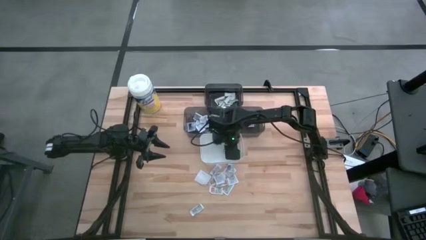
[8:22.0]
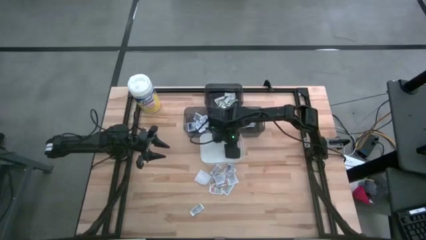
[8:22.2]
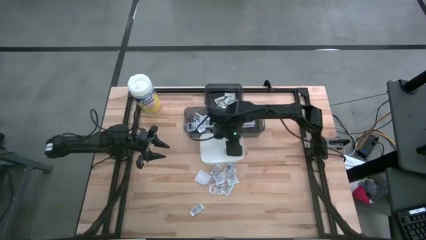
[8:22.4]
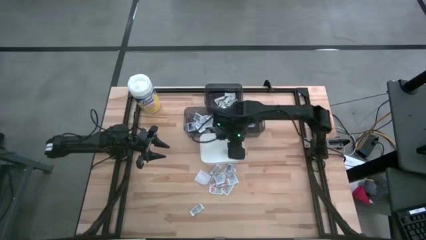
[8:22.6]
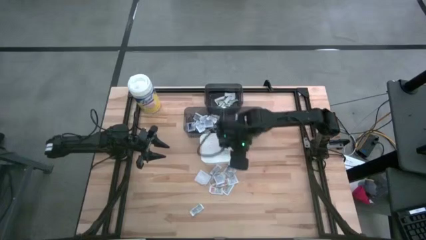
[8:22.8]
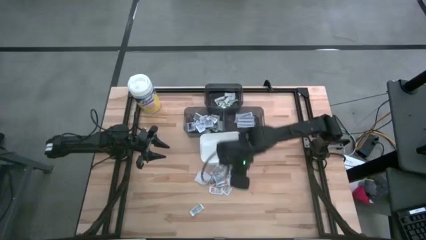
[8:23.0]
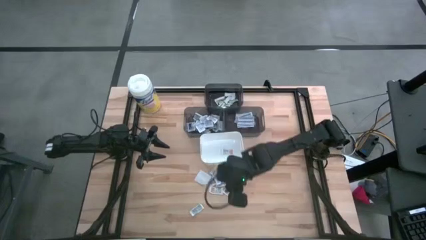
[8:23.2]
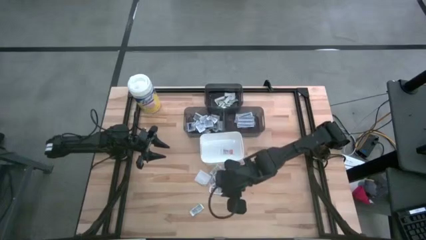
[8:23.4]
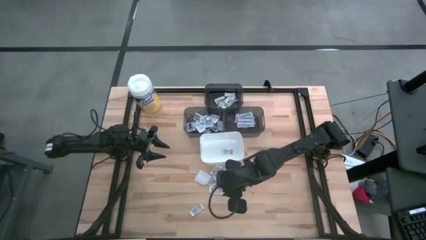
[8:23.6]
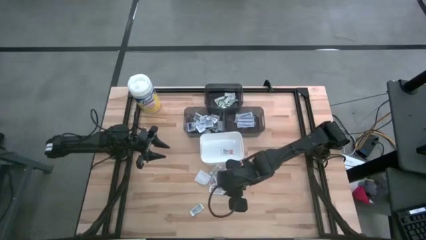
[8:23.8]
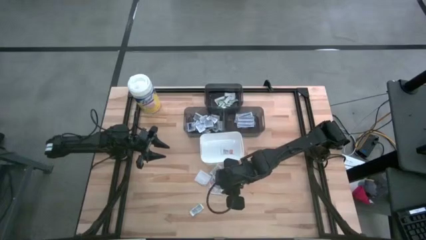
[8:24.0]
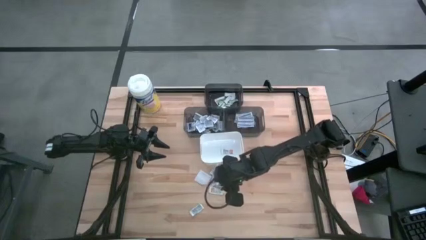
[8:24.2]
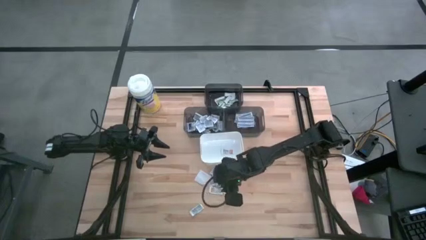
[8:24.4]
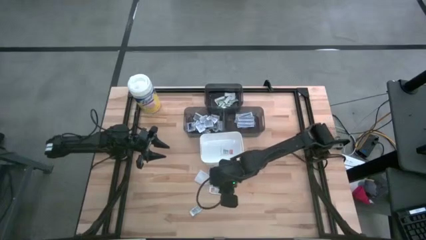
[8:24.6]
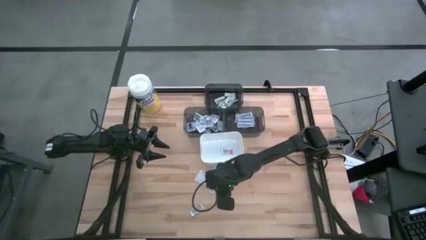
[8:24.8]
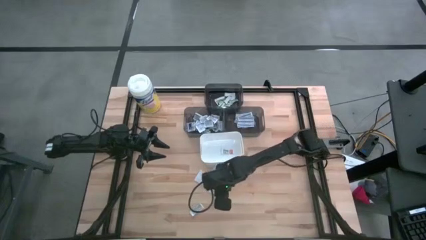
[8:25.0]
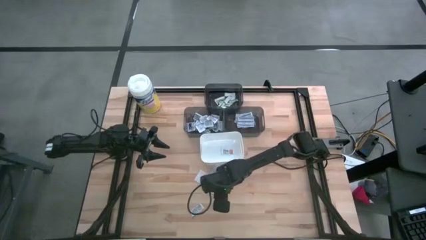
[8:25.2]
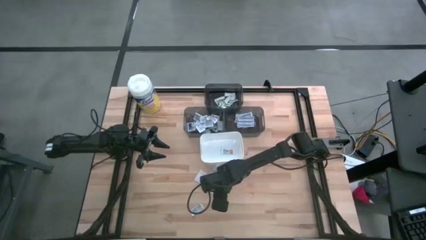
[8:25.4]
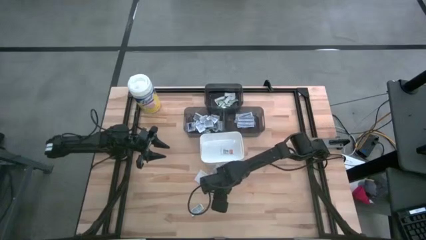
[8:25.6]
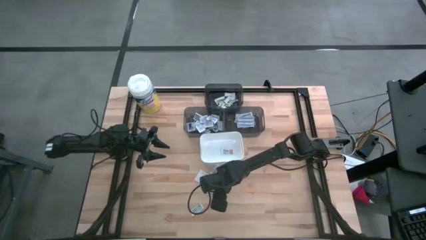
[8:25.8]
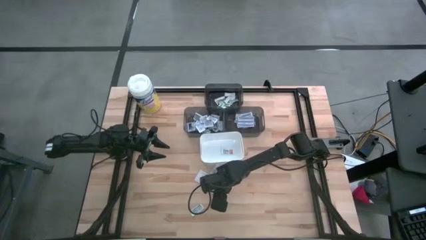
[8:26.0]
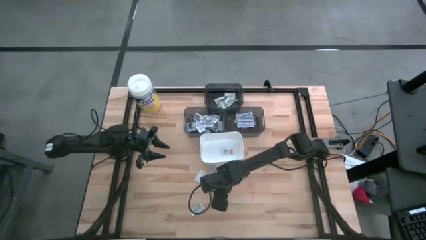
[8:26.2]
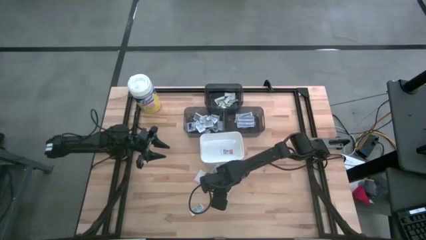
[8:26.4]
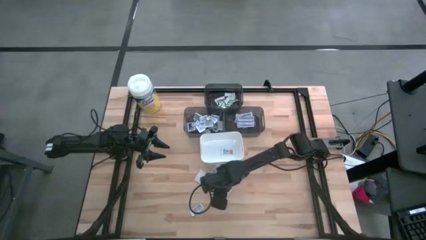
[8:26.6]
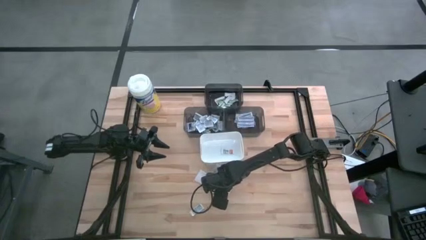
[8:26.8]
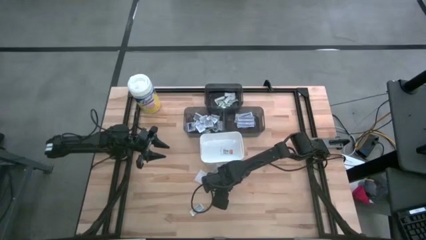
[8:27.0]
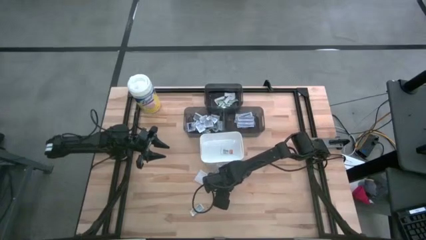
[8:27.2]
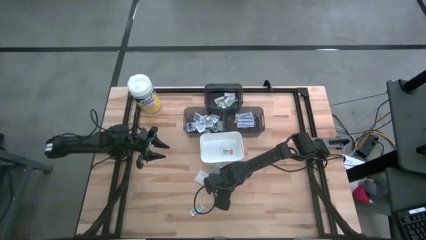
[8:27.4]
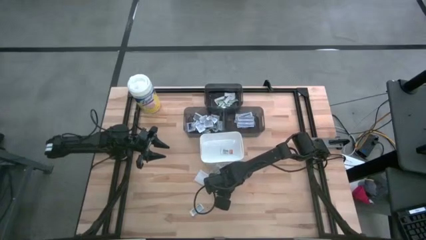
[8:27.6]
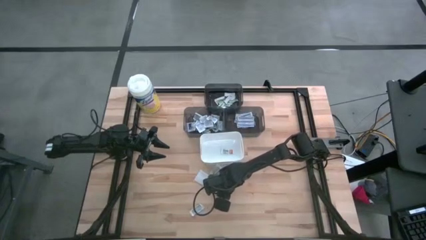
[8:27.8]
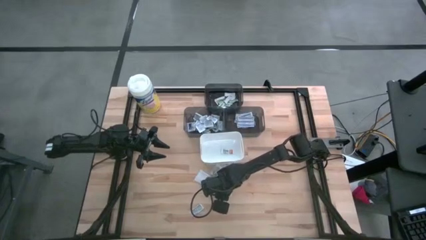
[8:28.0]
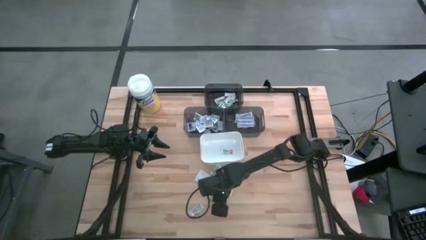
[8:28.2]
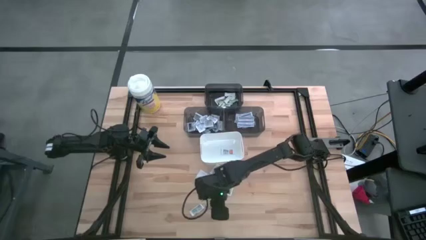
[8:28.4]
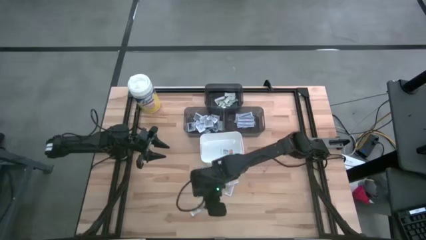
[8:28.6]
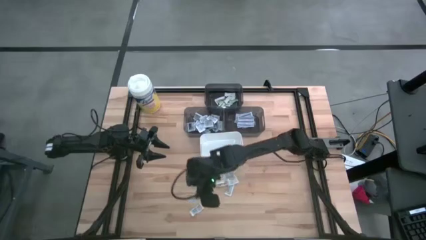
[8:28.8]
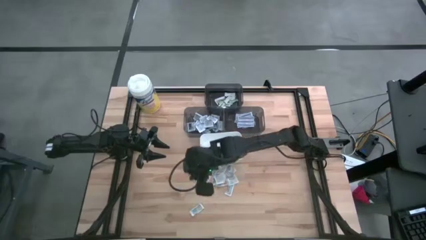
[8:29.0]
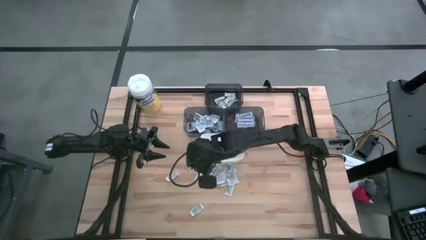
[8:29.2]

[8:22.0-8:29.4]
Task: Pick & Place First Aid Supplies
Put the ointment pack into the white bin

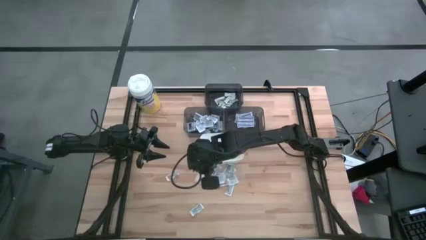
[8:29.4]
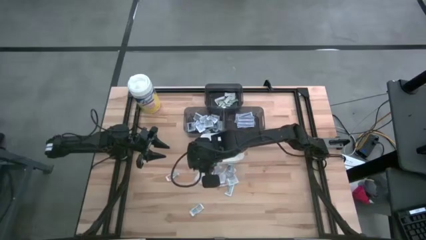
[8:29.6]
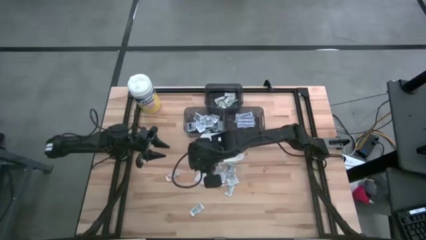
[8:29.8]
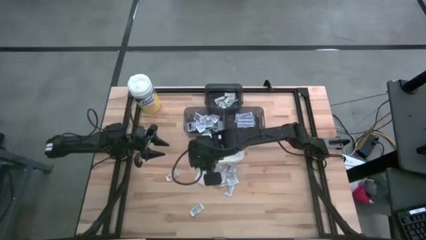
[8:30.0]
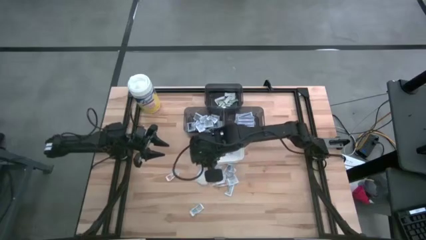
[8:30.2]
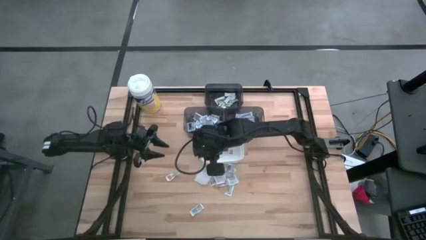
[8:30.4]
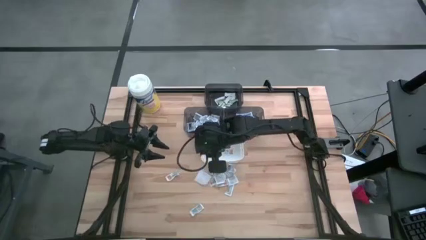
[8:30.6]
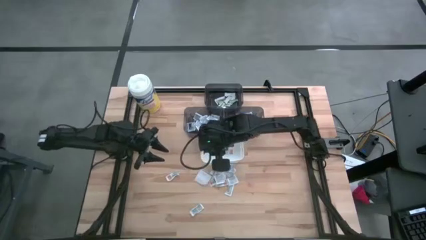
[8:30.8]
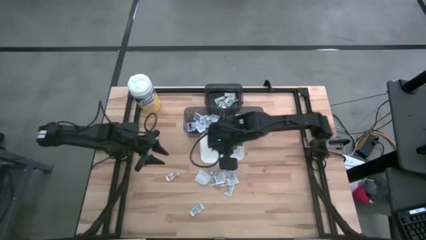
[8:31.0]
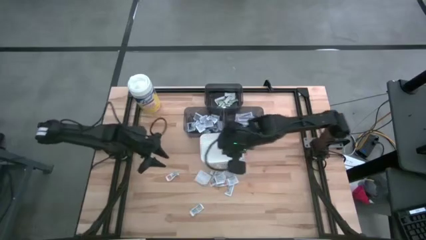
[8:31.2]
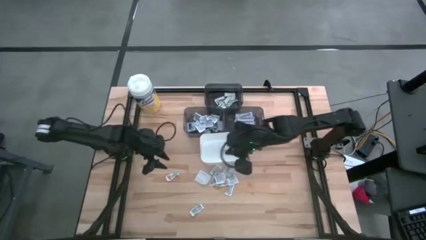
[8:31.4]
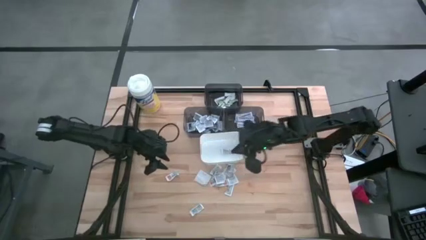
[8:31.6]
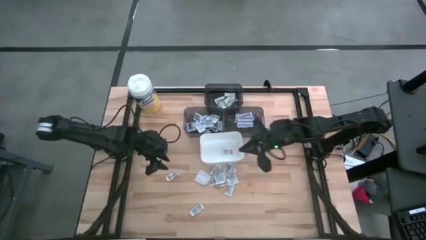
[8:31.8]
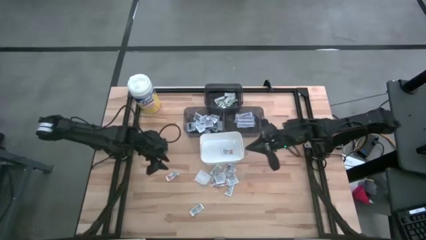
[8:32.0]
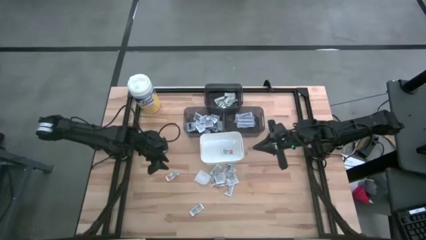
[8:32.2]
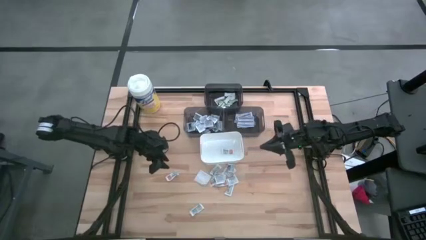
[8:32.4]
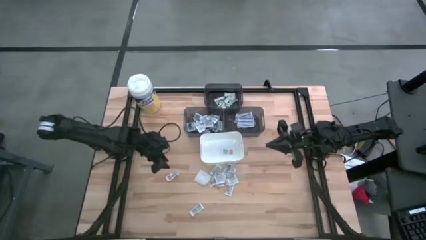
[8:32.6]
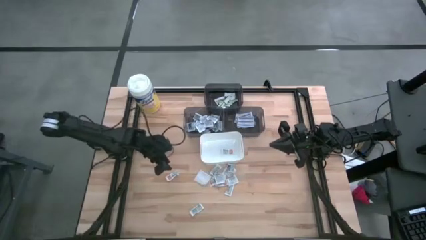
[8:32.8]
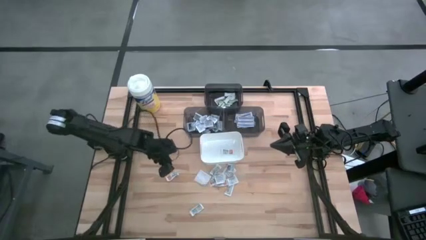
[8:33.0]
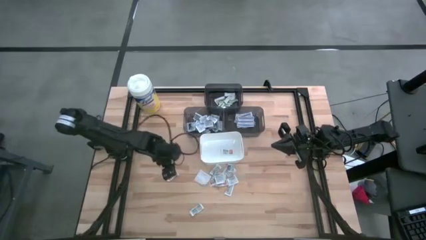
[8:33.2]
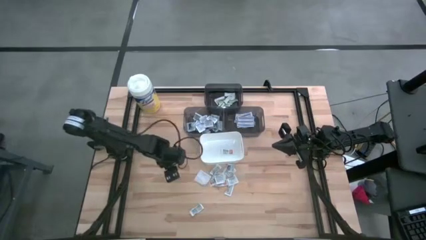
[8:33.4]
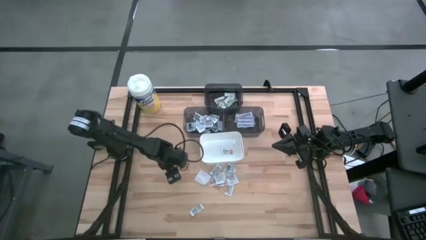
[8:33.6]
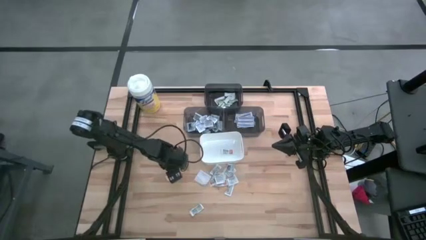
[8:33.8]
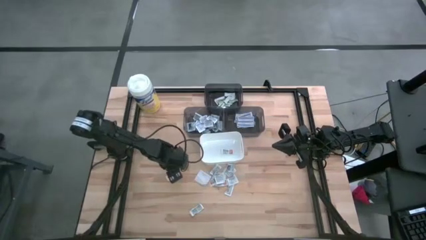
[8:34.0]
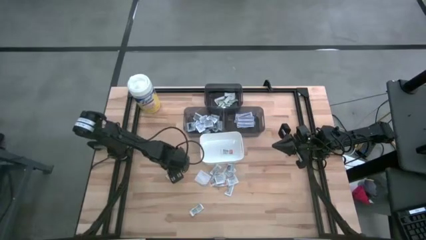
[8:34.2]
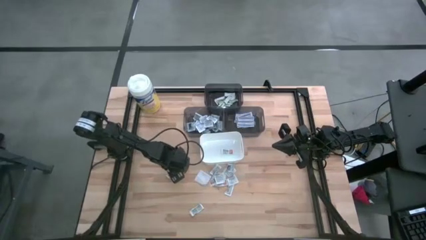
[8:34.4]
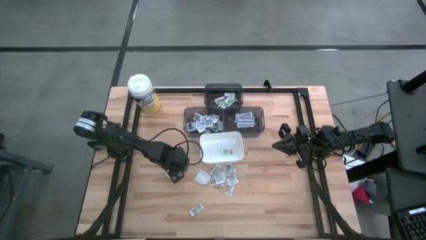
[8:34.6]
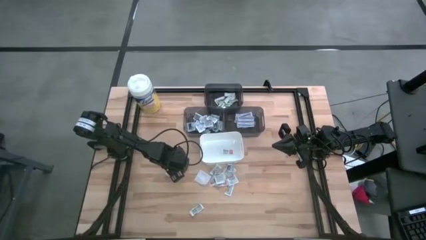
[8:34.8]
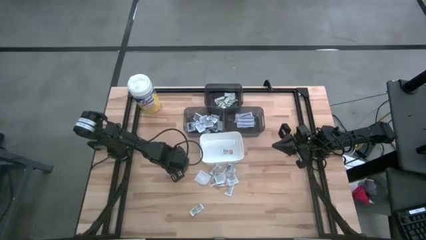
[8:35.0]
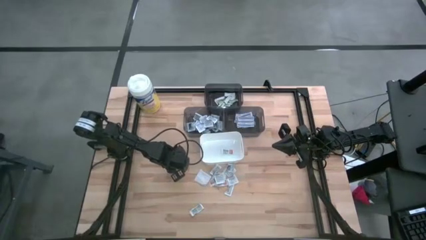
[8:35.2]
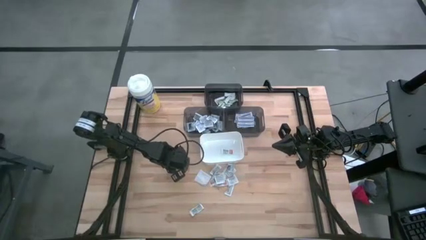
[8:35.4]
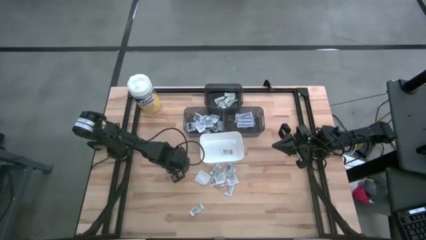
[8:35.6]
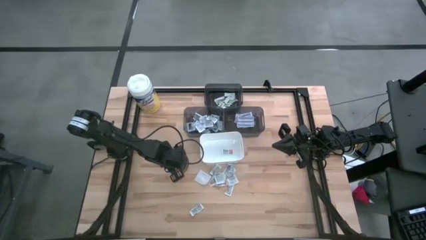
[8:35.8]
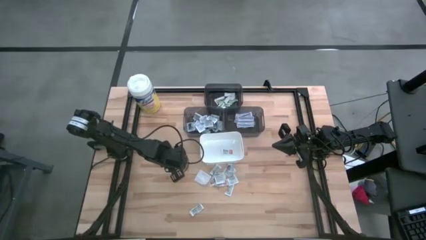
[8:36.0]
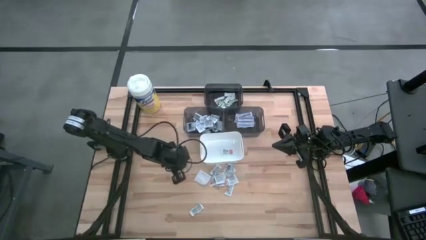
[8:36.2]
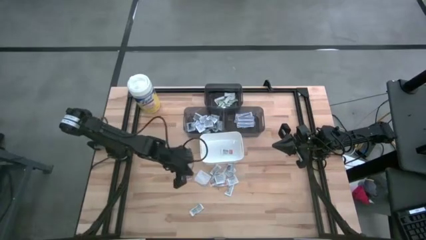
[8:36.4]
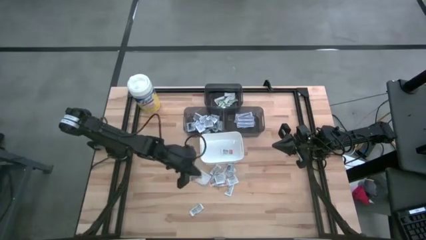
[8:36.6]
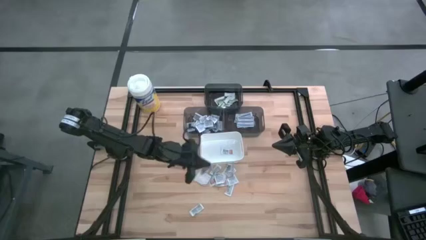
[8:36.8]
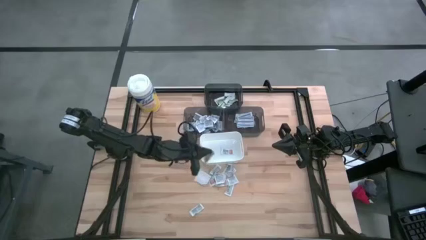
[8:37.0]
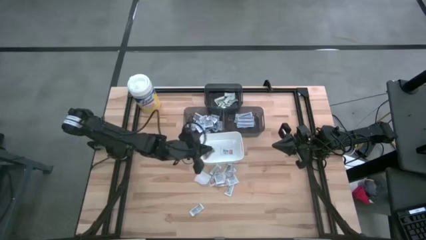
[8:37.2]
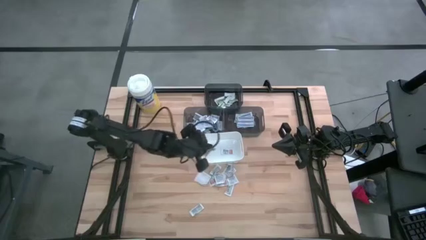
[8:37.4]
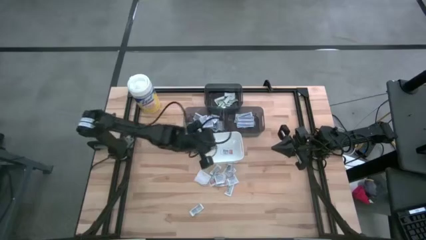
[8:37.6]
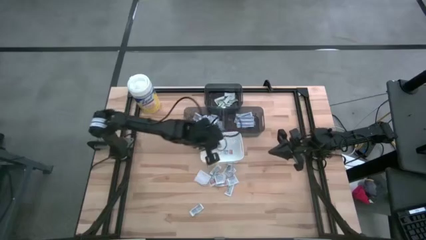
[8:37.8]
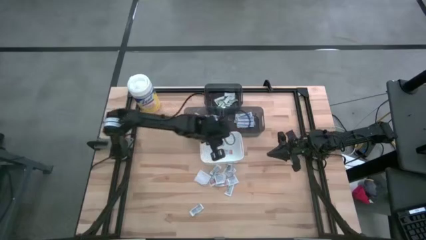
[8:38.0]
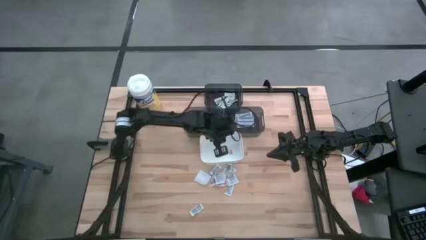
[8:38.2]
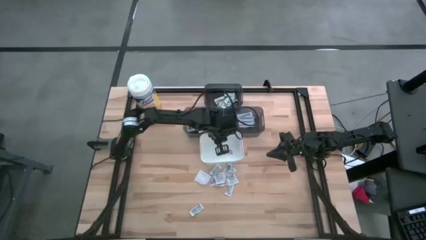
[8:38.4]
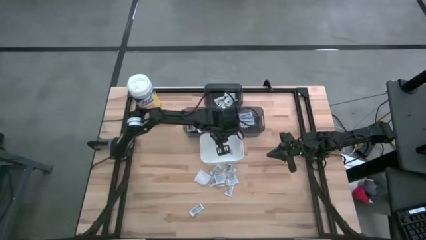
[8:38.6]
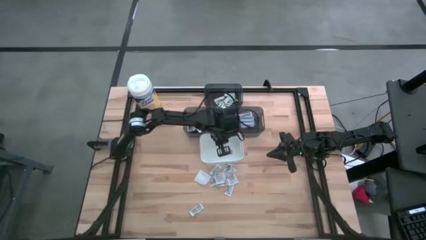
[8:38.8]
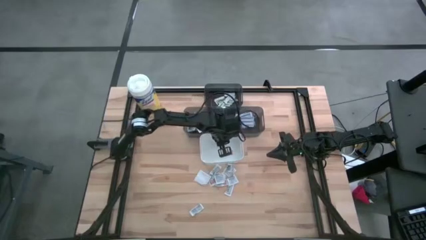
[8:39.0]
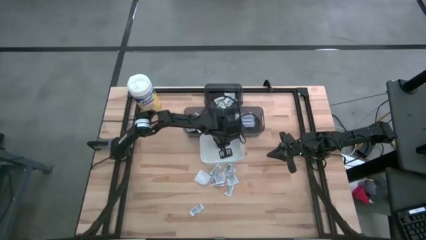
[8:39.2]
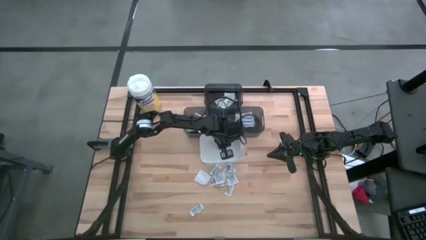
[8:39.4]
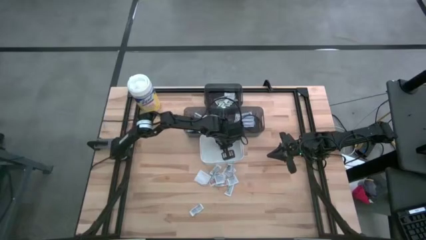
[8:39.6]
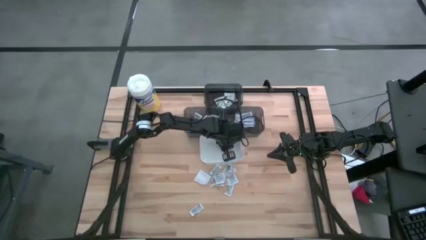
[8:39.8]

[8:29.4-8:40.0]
Put the ointment pack into the white bin
